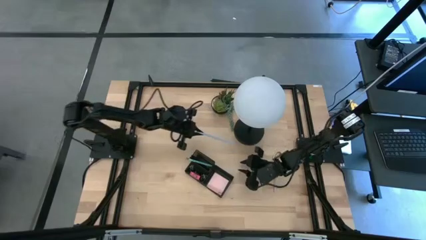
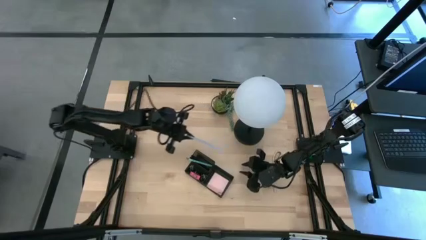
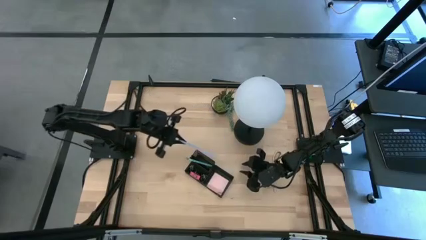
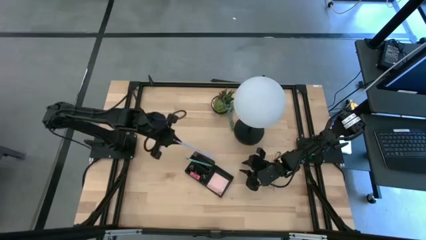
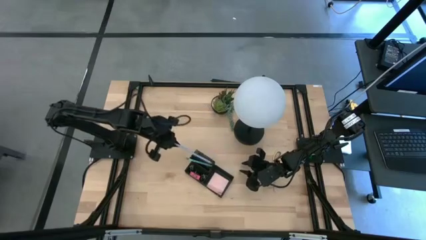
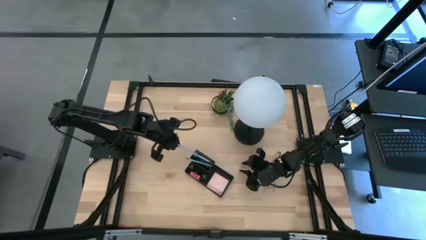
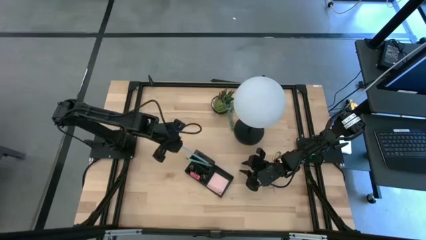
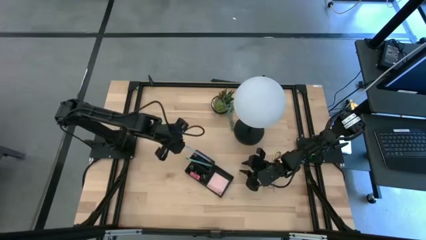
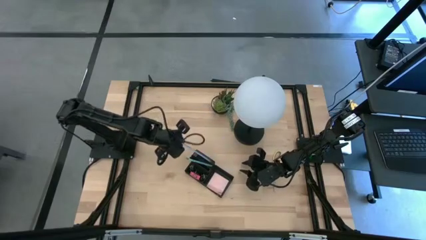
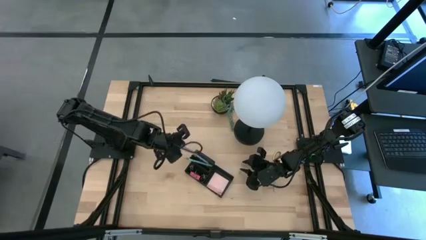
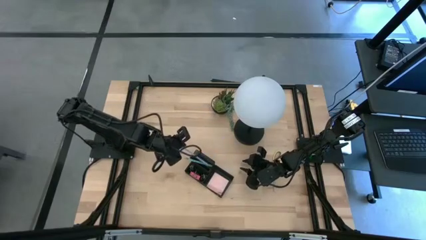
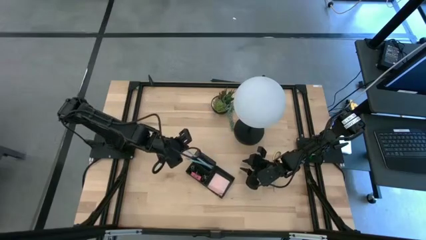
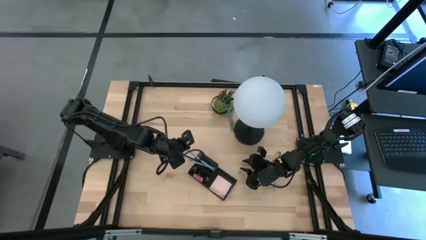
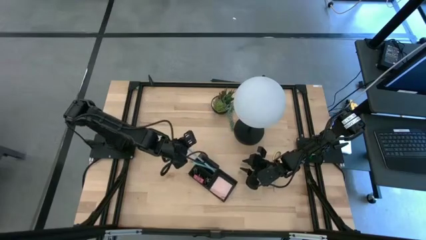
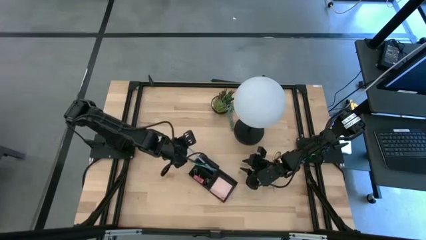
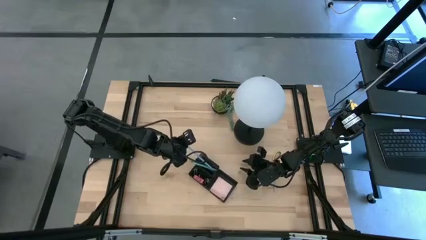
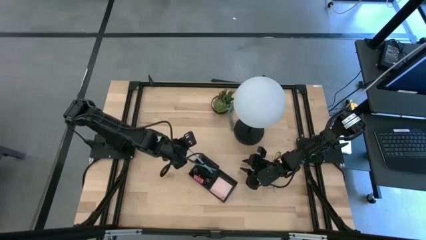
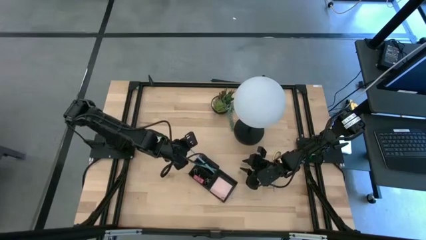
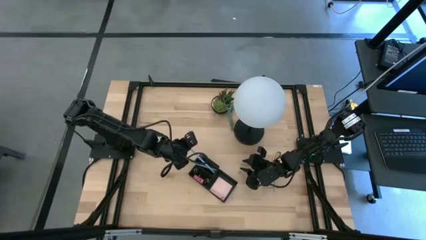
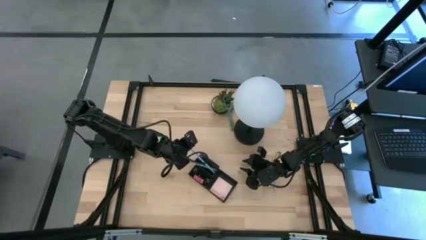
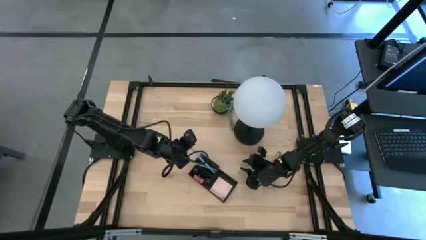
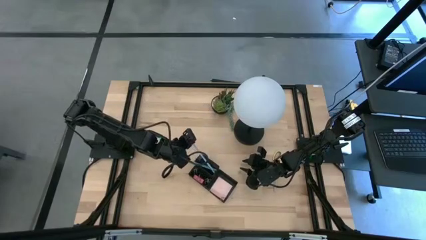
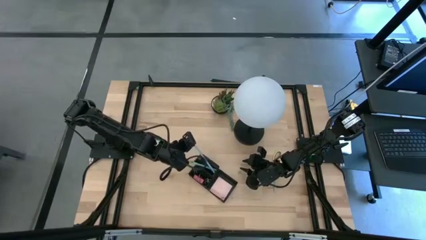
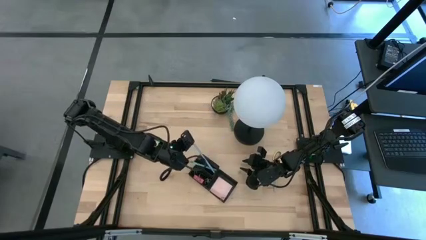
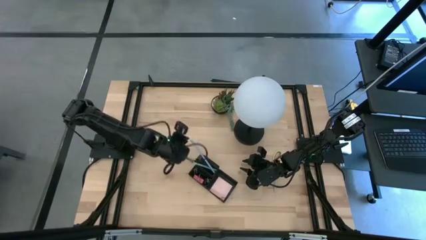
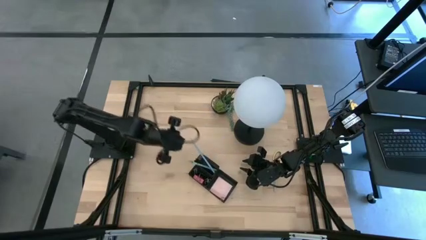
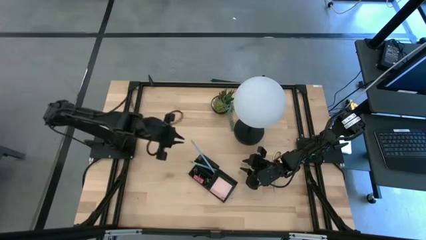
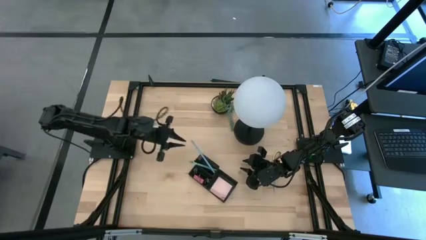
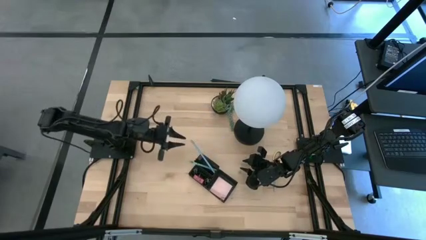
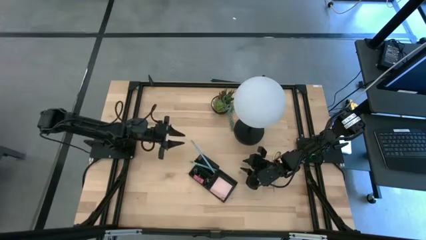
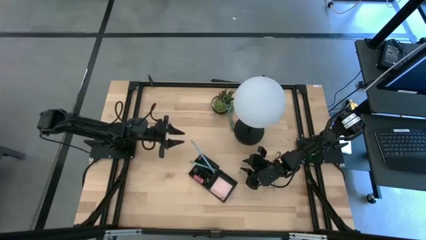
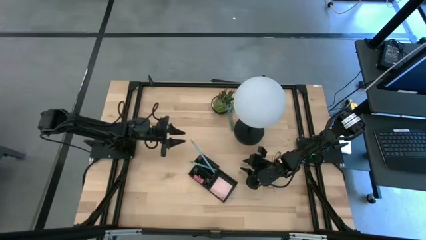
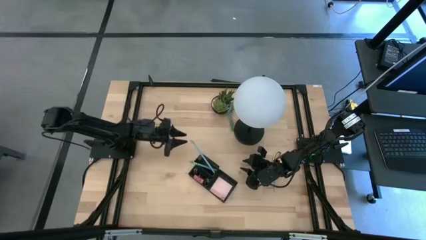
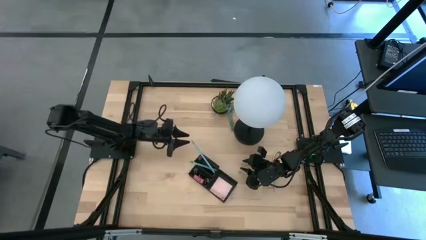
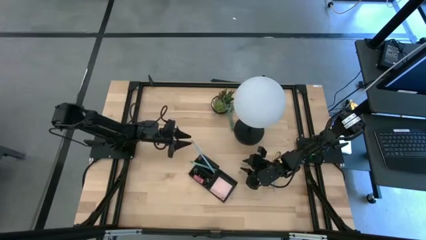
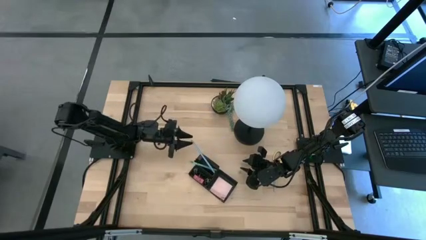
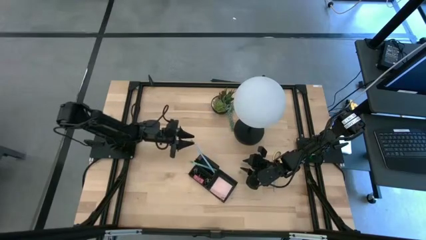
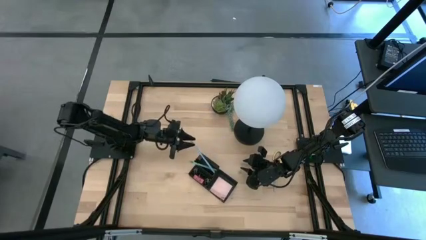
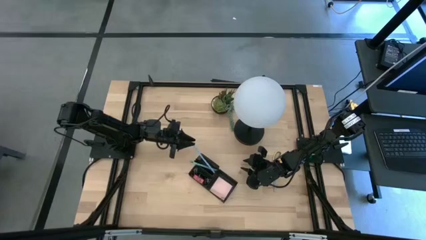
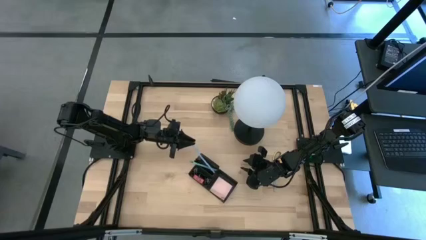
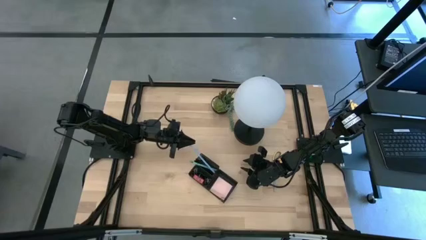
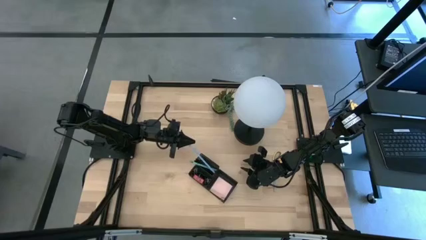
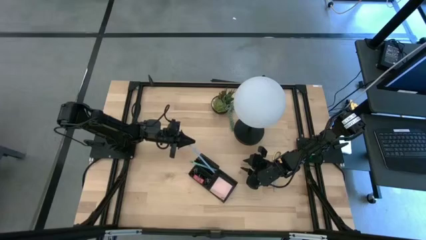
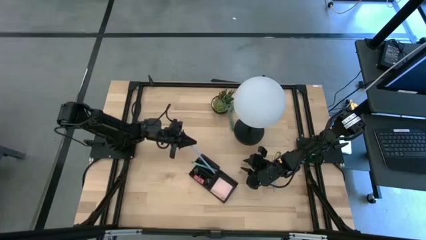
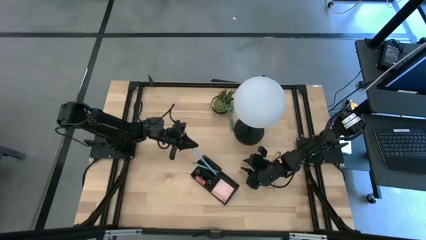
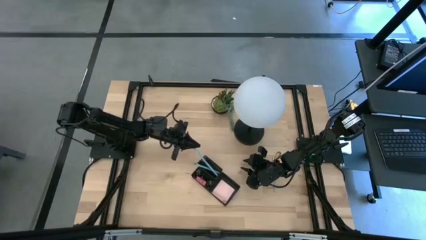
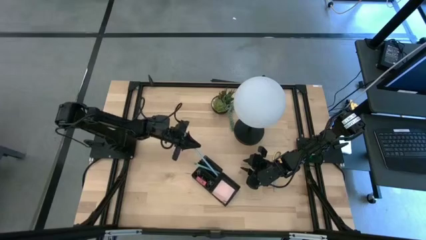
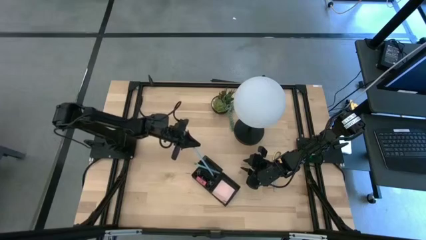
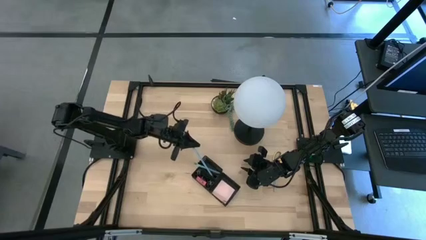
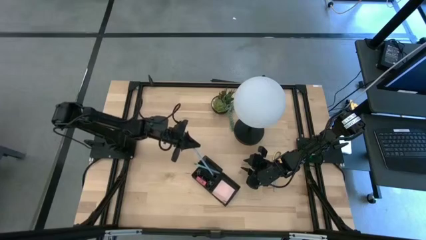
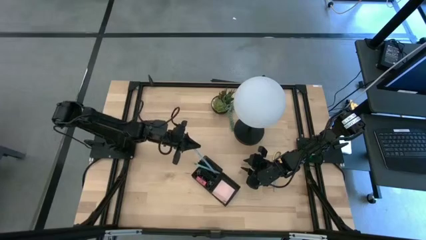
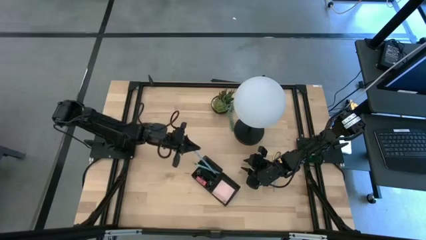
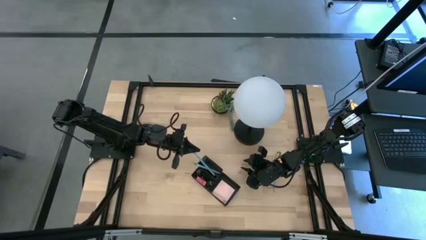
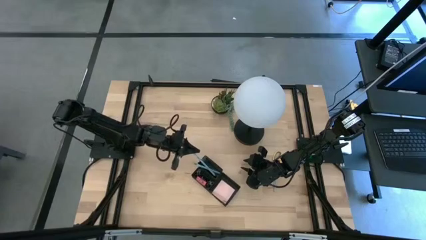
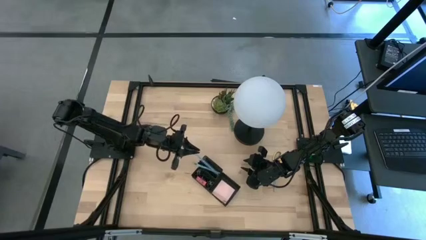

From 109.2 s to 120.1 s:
Task: Pick and place office supplies into organizer
Put the blue pencil into the desk organizer

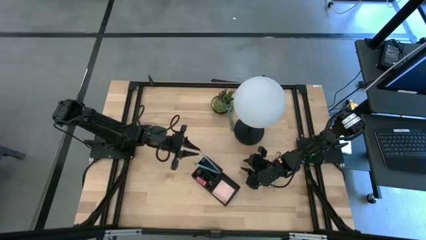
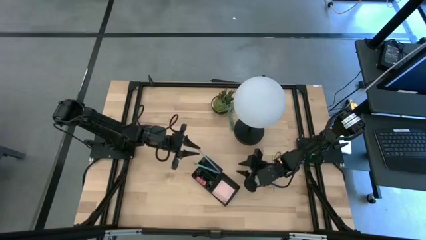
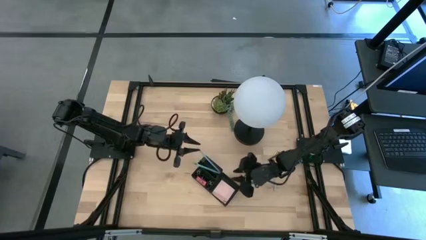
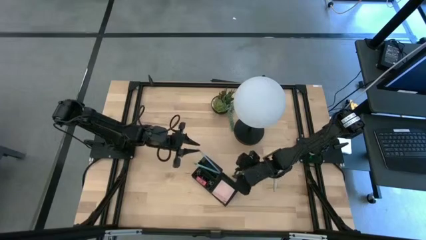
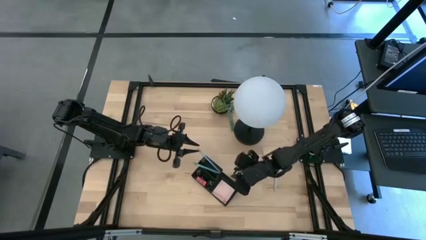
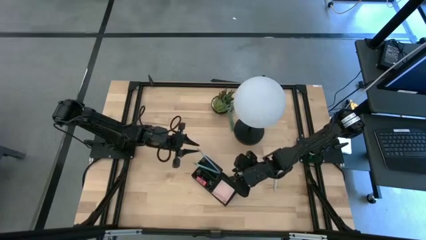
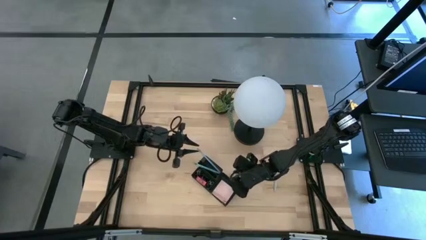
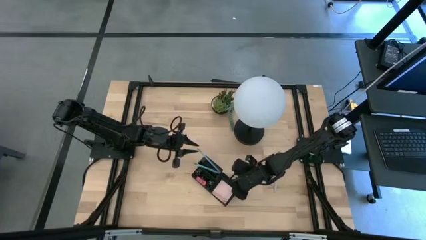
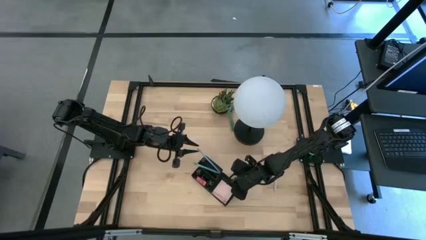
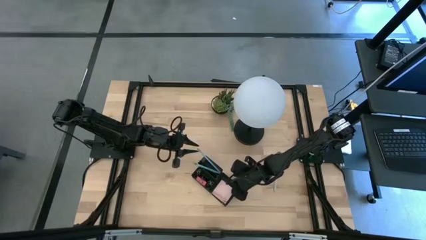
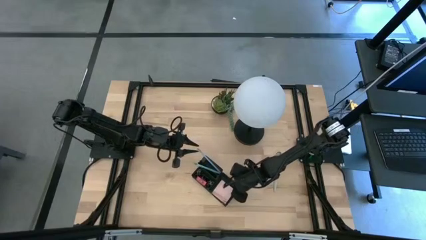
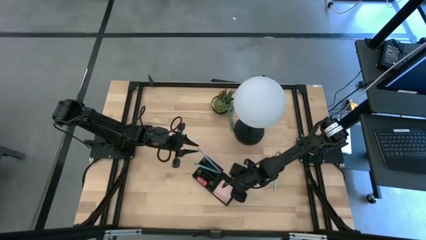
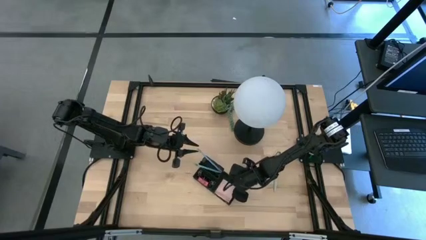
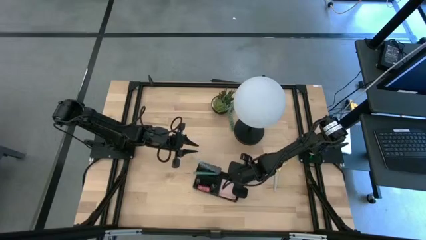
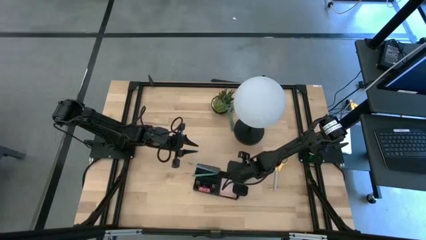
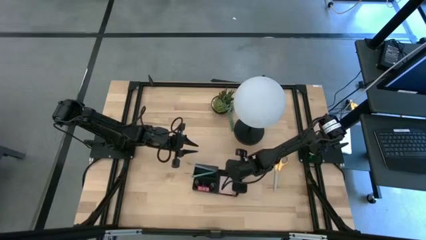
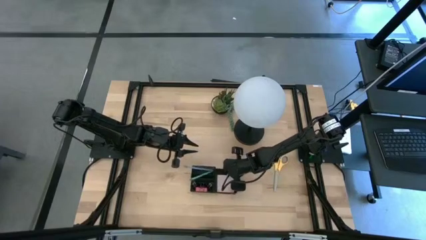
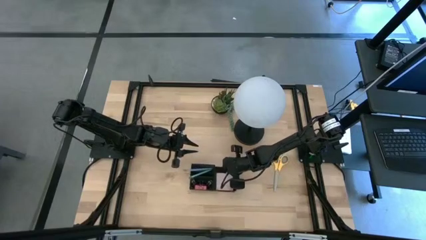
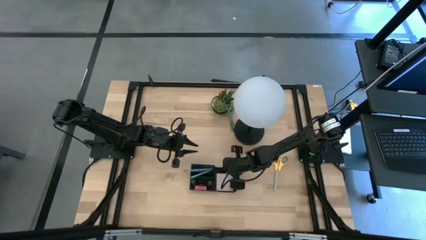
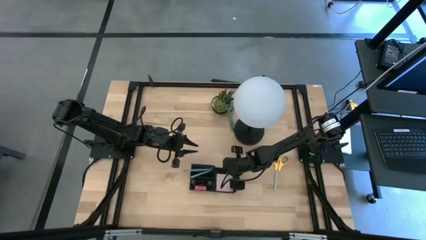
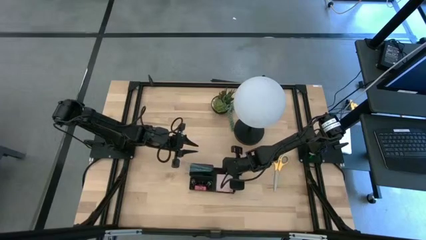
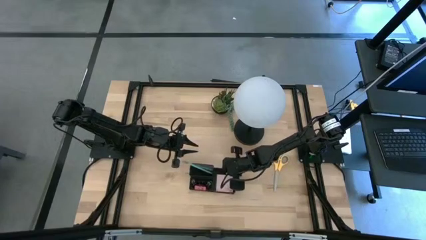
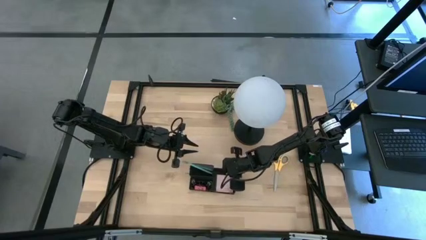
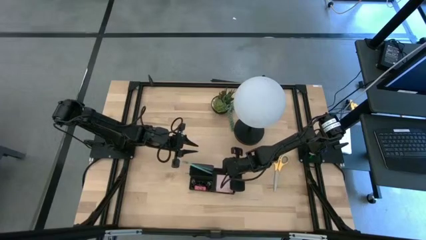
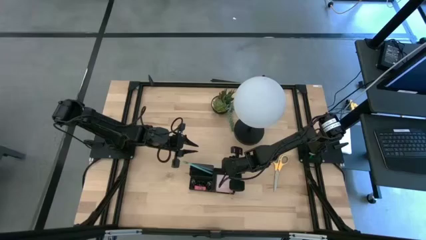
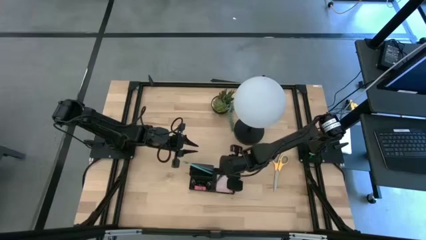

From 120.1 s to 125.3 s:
Adjust the desk organizer on the table
